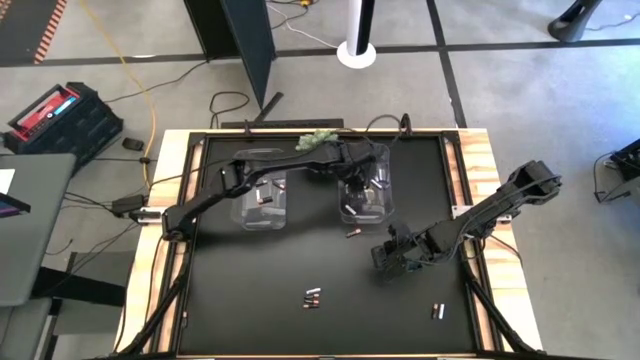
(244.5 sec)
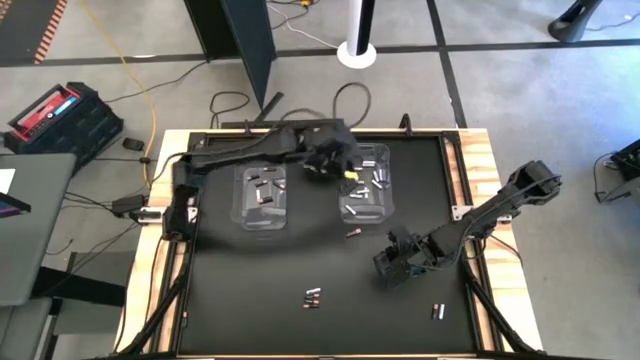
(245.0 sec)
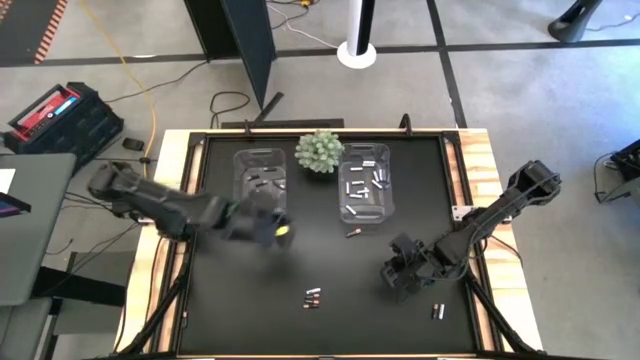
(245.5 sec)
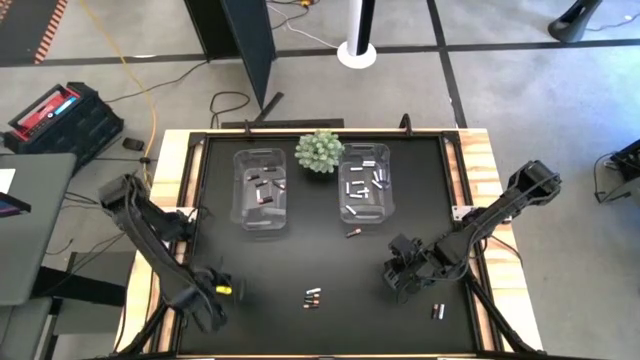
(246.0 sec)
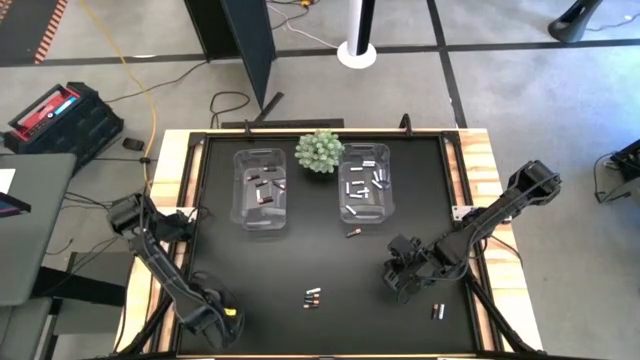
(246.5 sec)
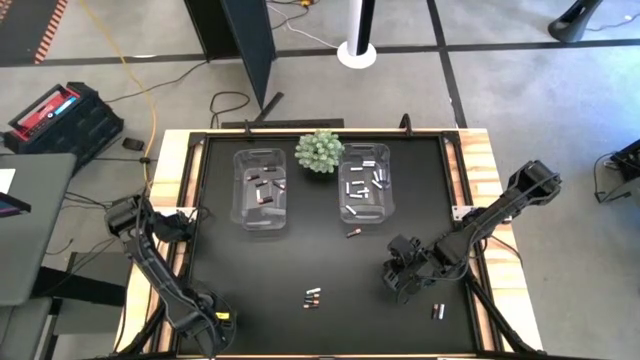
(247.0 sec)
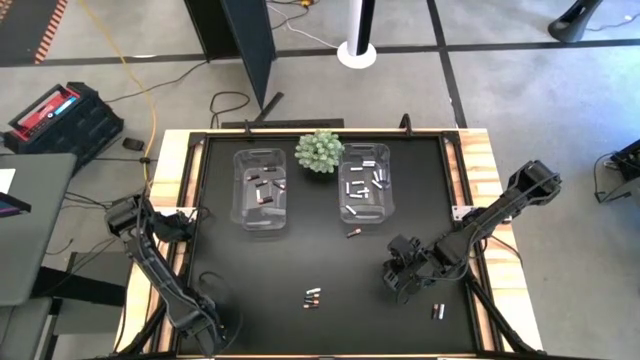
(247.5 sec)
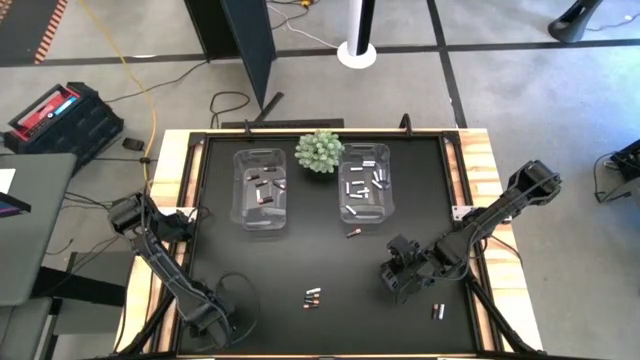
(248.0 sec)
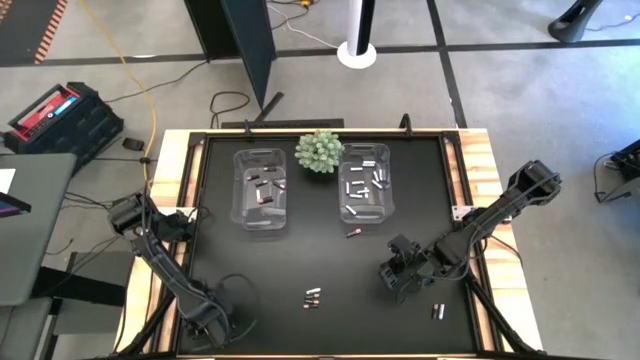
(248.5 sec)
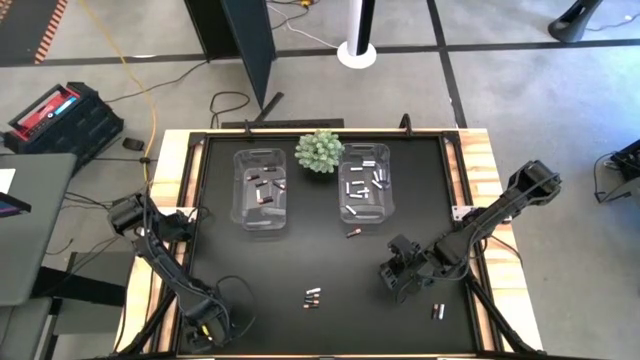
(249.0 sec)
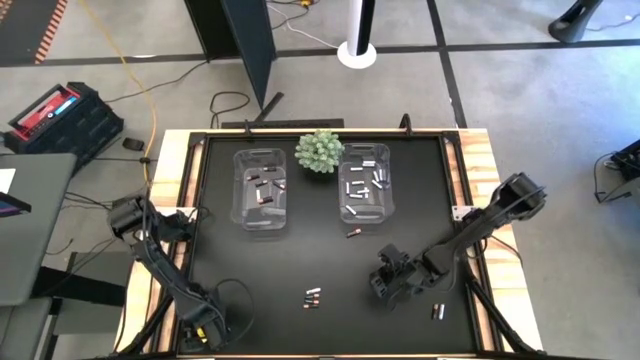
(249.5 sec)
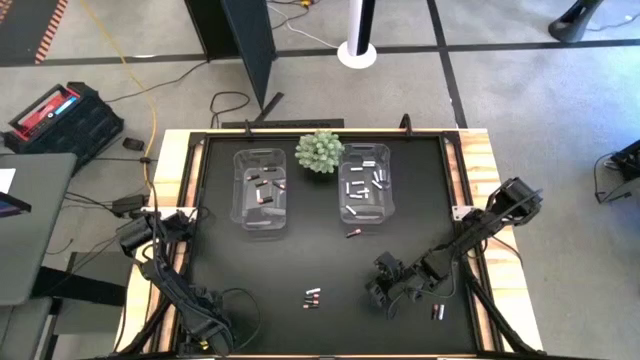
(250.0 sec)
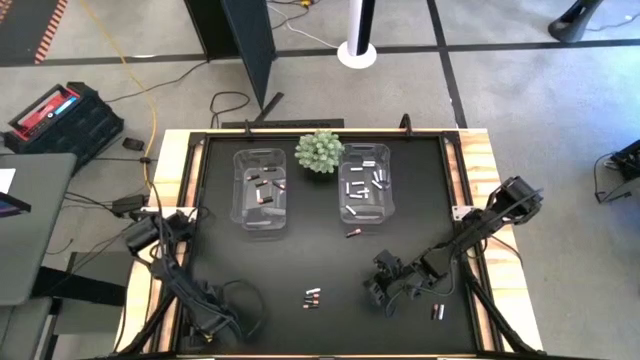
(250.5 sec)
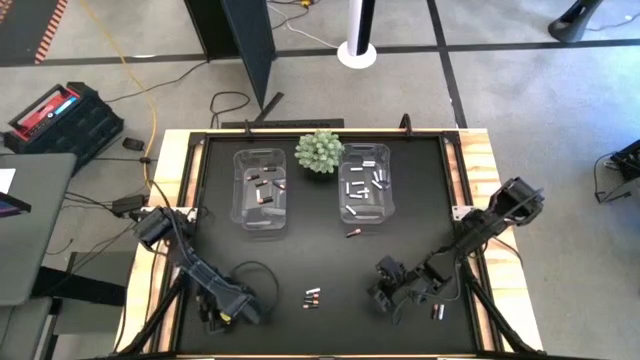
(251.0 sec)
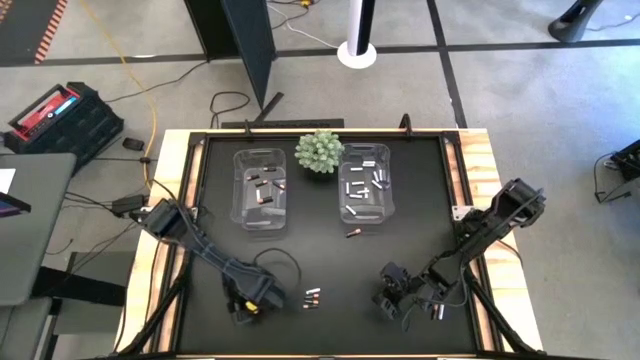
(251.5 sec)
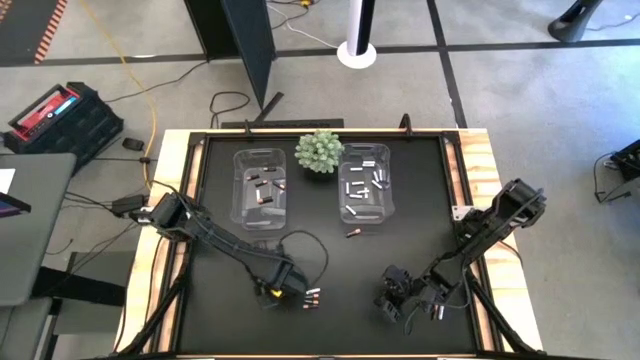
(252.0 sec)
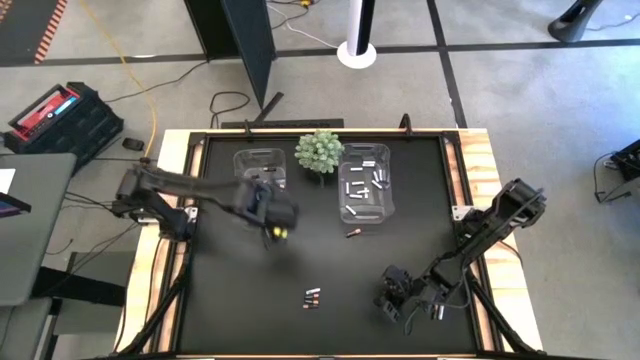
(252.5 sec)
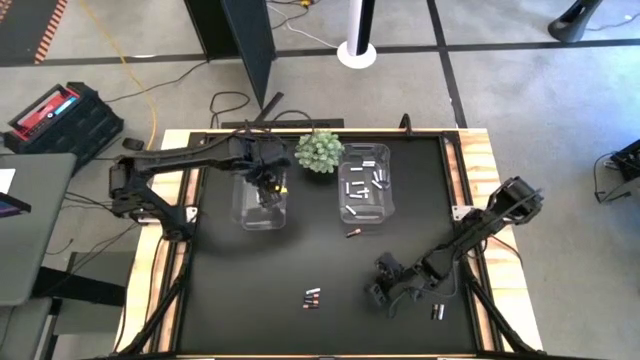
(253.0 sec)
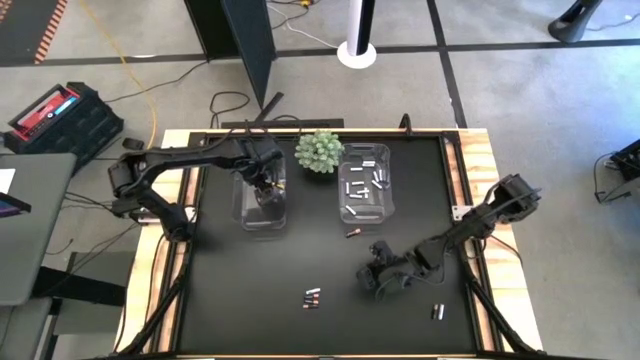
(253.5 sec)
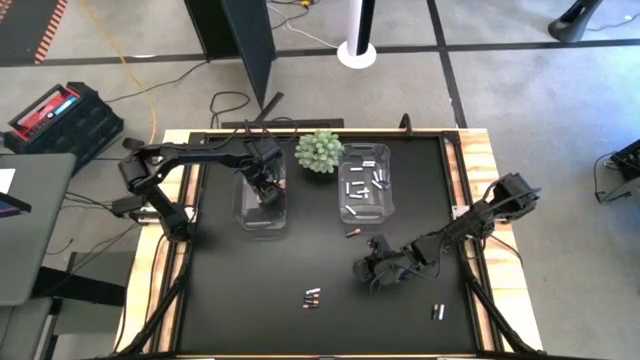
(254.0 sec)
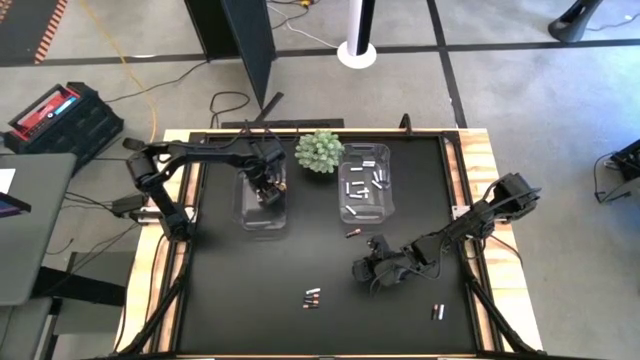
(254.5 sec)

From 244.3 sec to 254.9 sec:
Task: Sort batteries
Put the black-brown battery into the left transparent bin

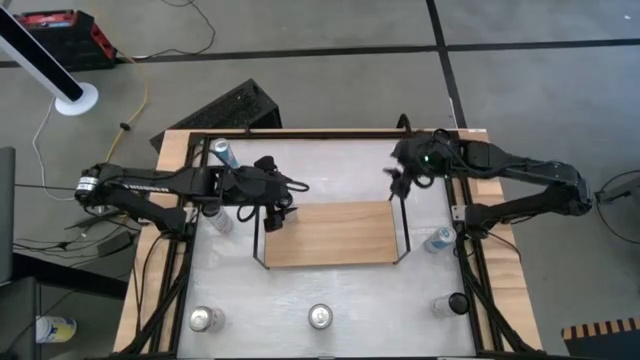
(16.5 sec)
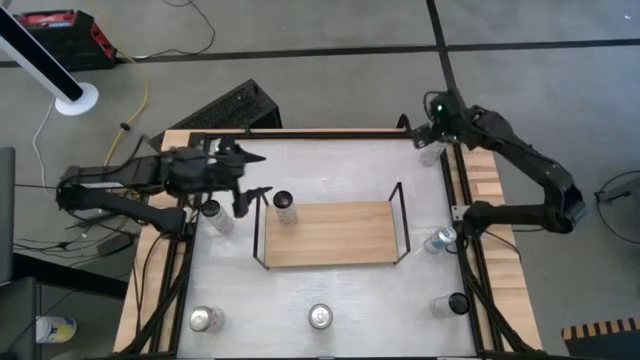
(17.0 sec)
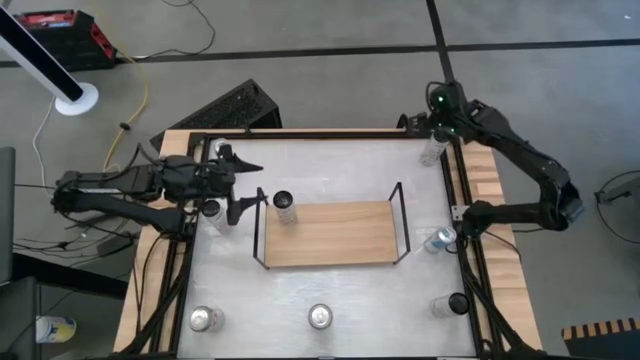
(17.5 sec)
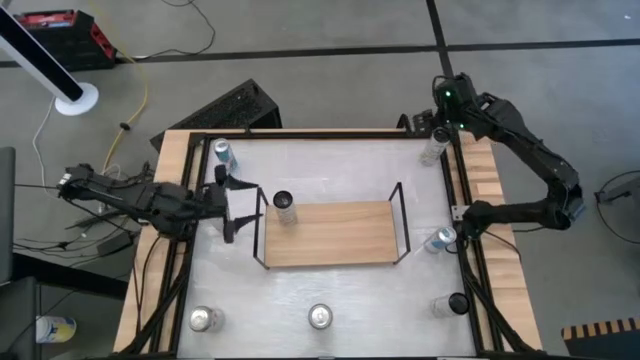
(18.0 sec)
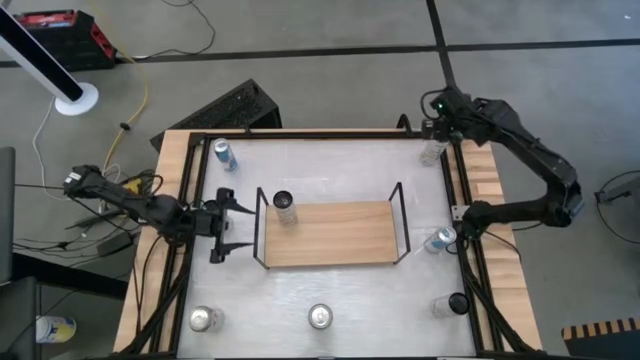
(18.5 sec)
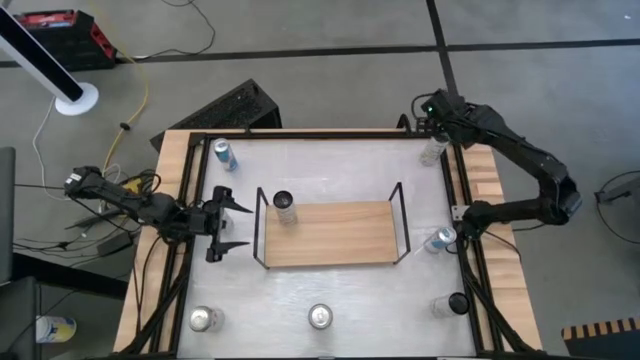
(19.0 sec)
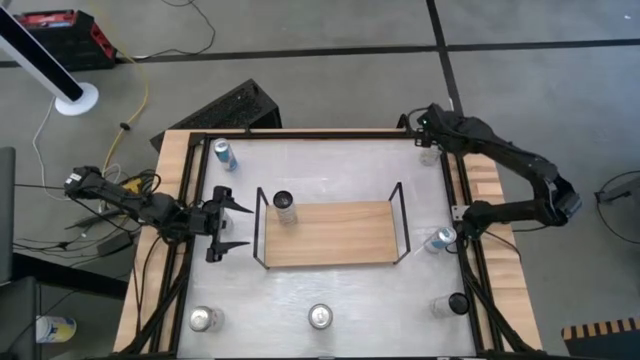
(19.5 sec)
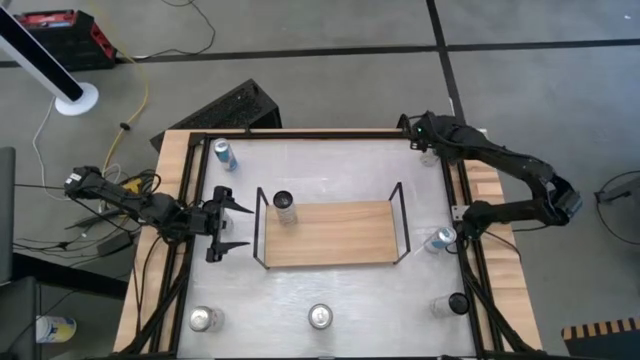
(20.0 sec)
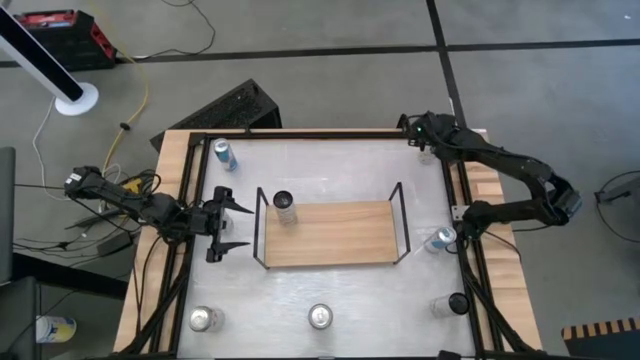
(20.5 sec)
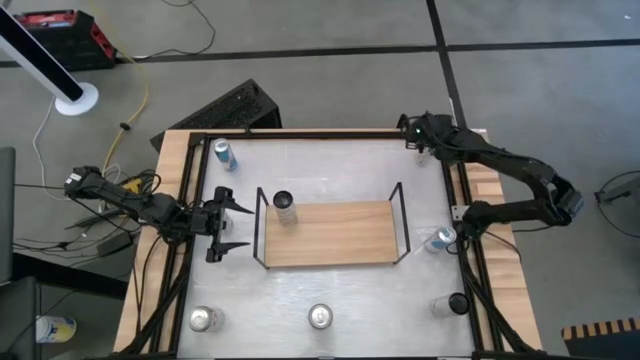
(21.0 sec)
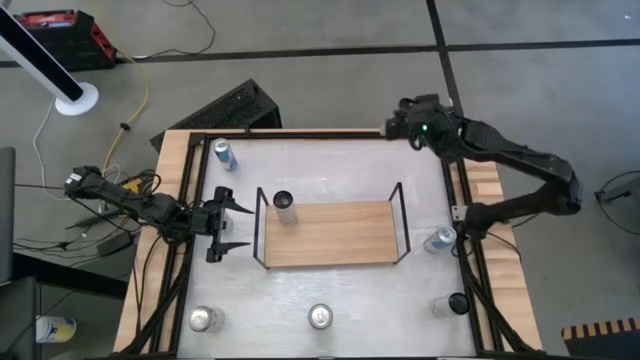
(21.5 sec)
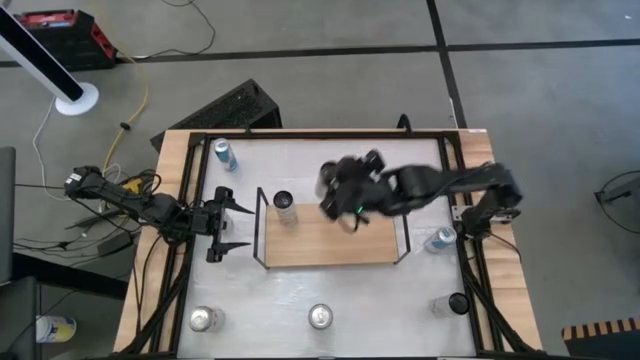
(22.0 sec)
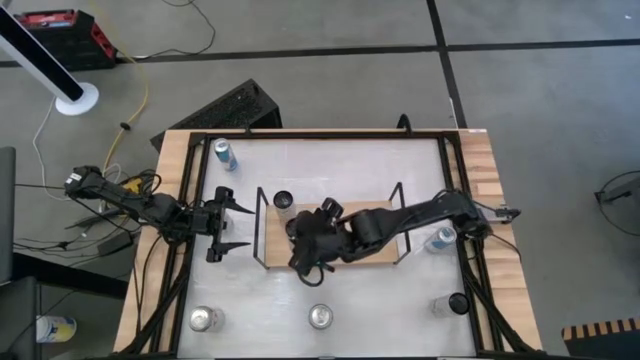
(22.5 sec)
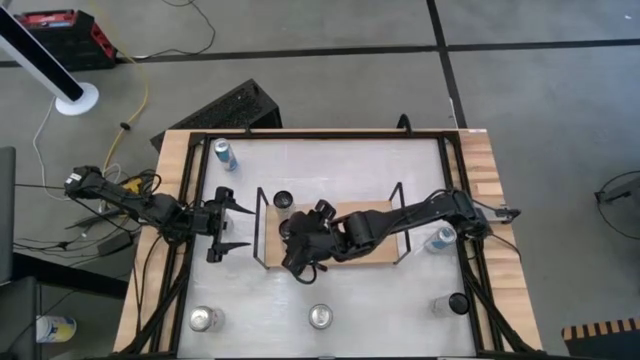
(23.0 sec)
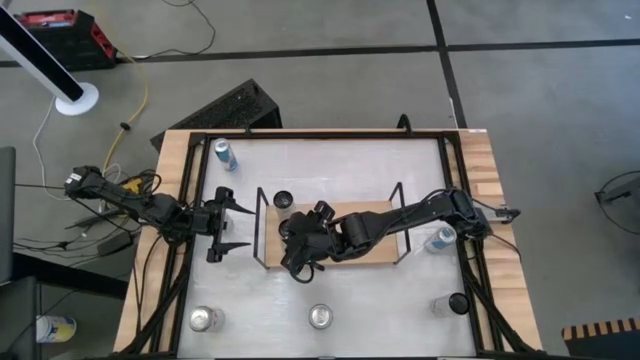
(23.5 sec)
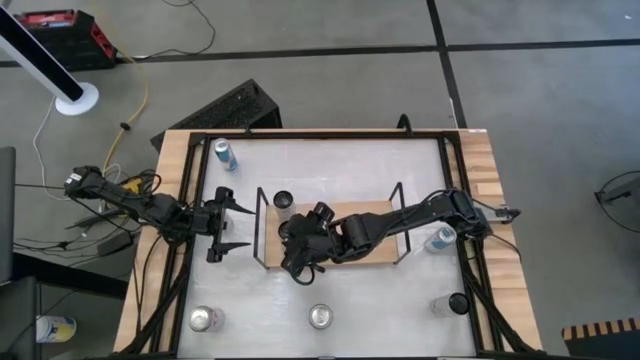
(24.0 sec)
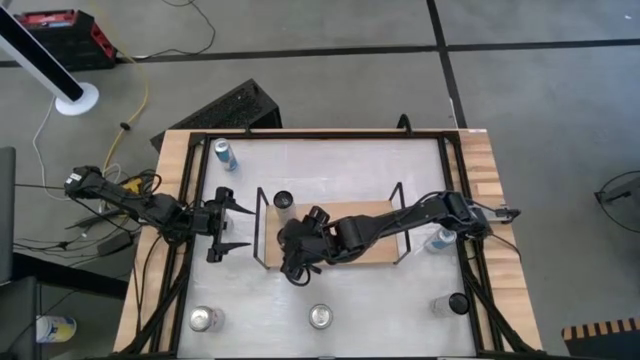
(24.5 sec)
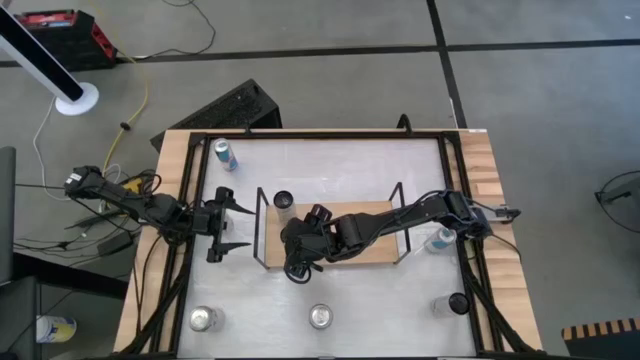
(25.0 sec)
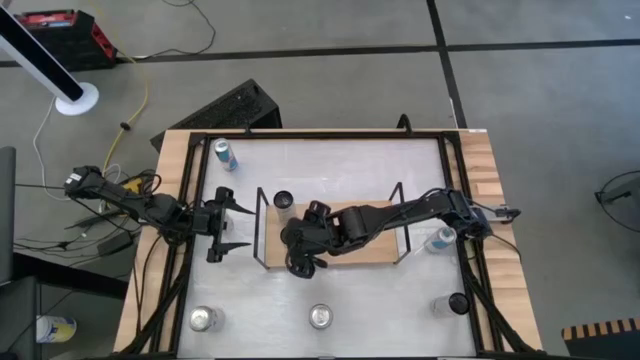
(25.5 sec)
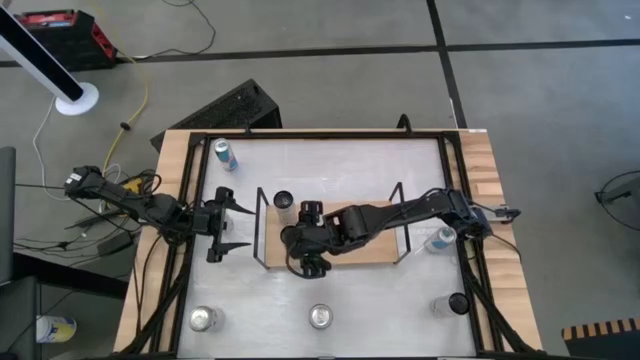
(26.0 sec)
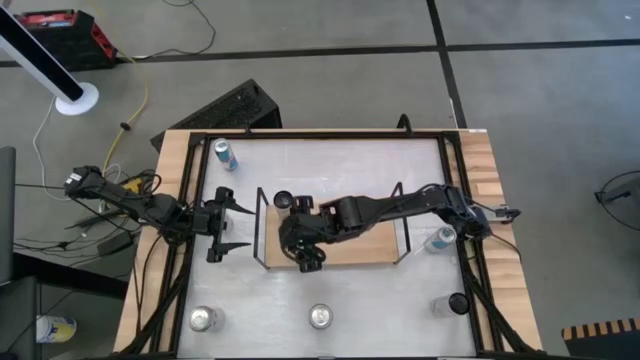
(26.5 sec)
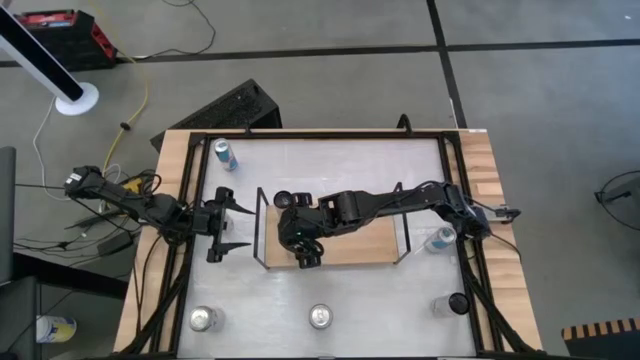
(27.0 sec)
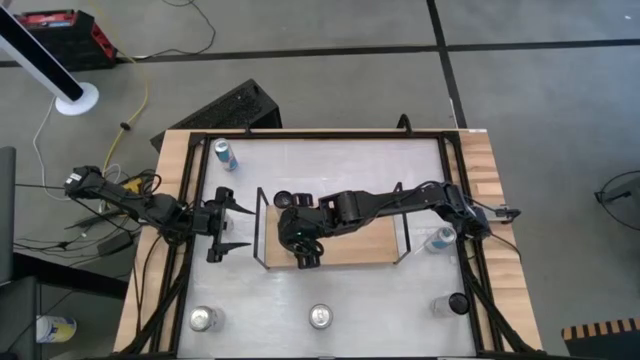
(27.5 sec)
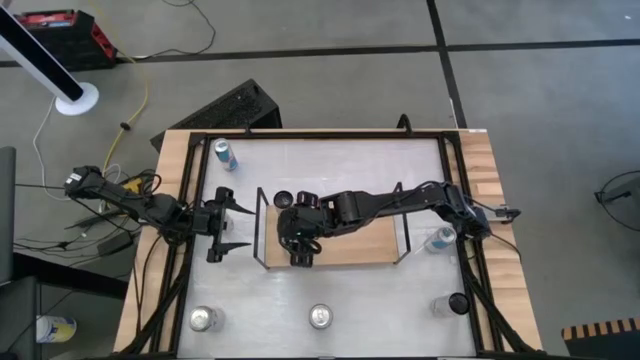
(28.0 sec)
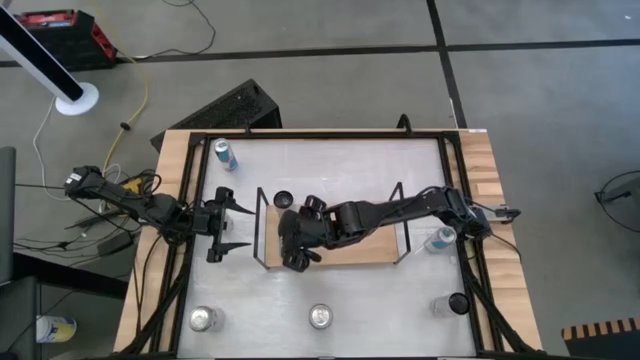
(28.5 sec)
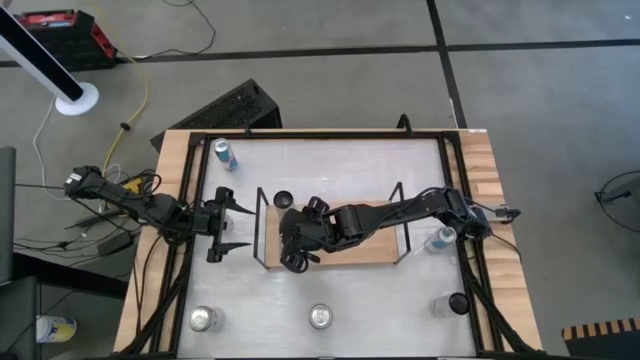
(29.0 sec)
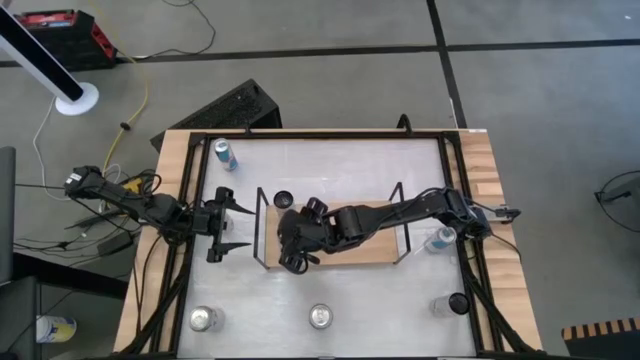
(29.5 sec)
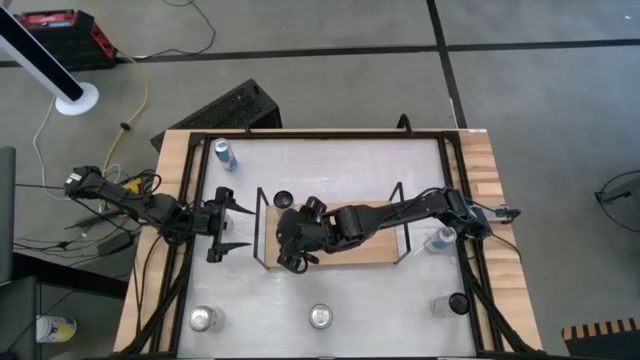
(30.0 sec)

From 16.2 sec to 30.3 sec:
Task: Place canned beverage on shelf
Put the white-yellow soda can on the shelf aligned with the other white-yellow soda can
